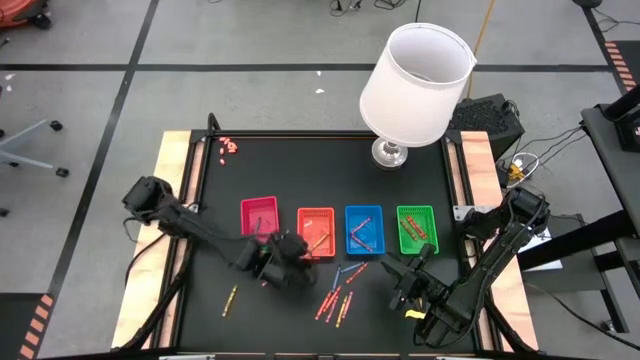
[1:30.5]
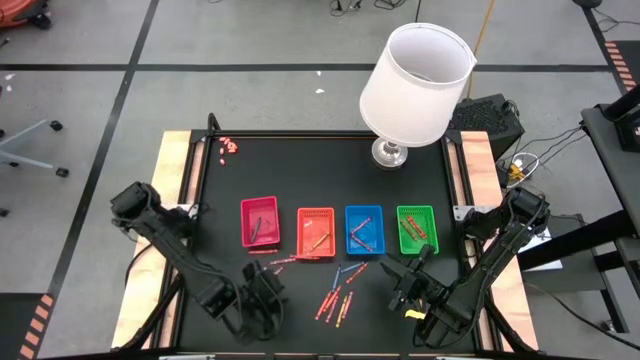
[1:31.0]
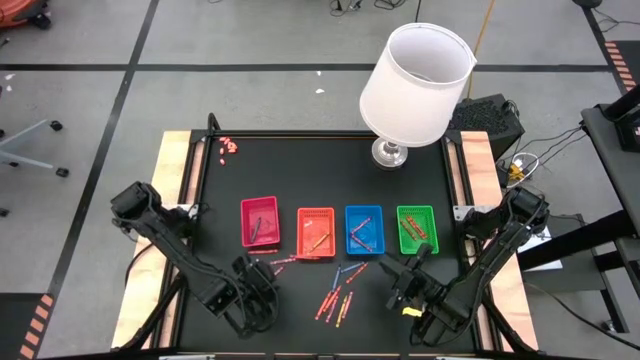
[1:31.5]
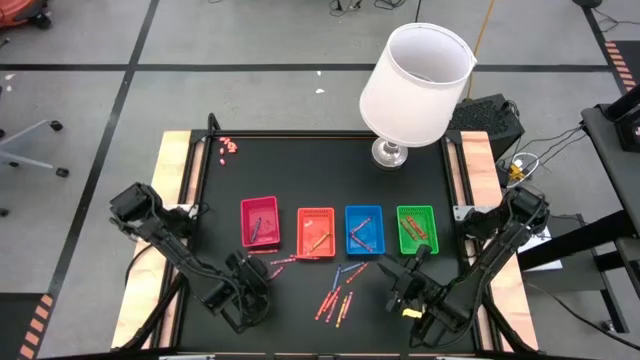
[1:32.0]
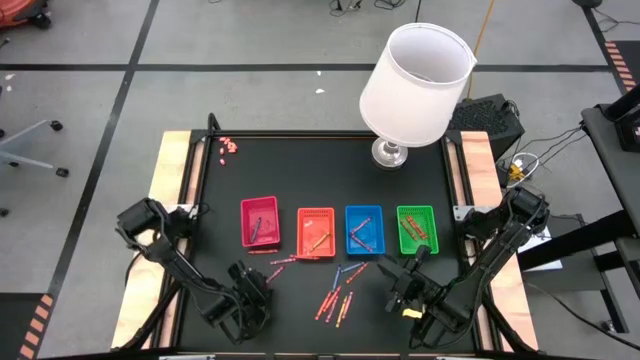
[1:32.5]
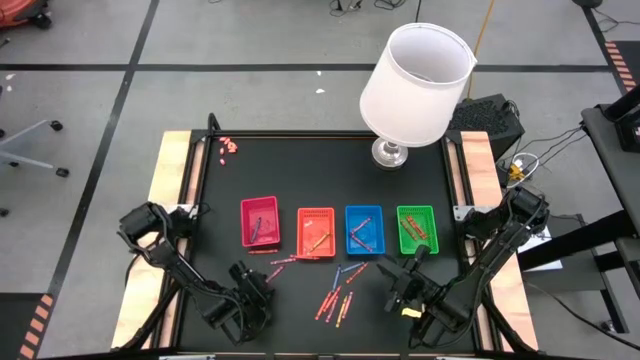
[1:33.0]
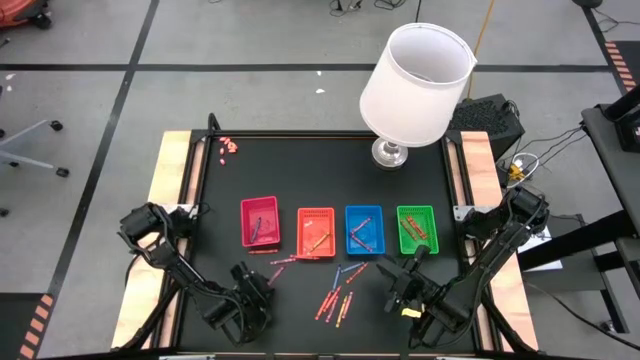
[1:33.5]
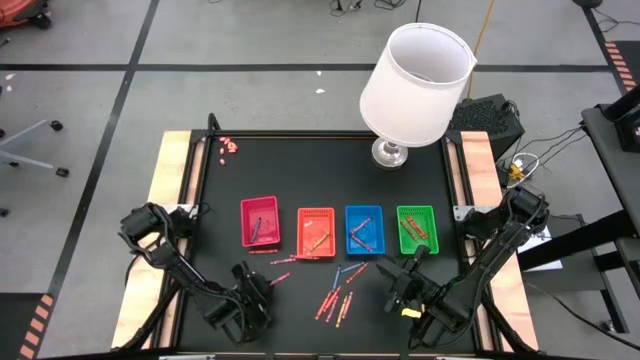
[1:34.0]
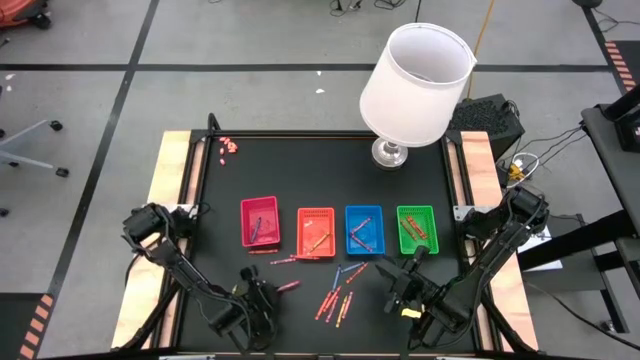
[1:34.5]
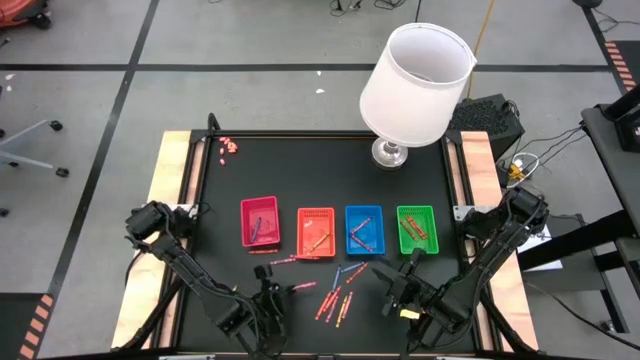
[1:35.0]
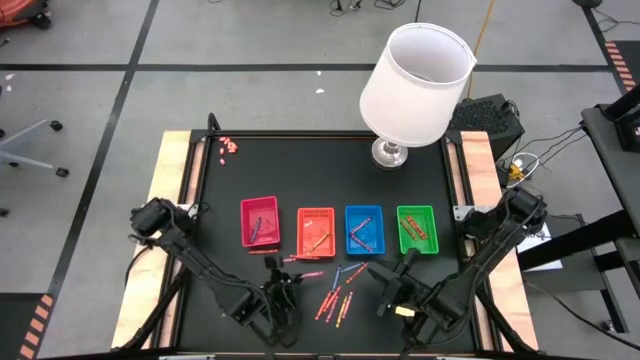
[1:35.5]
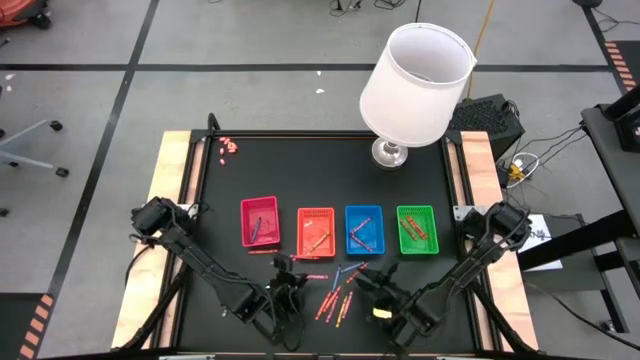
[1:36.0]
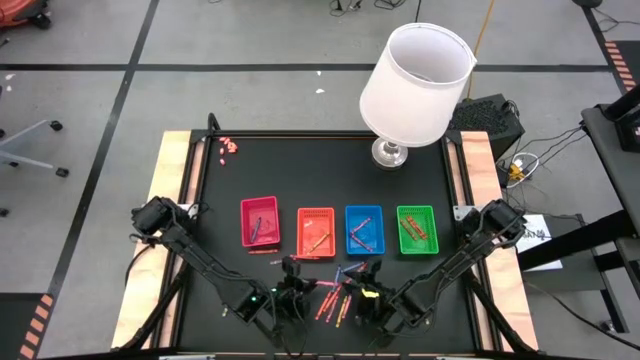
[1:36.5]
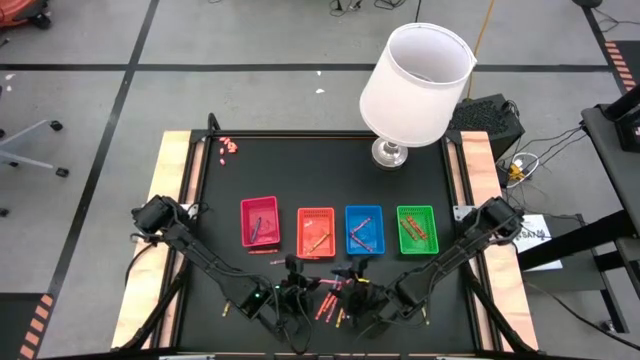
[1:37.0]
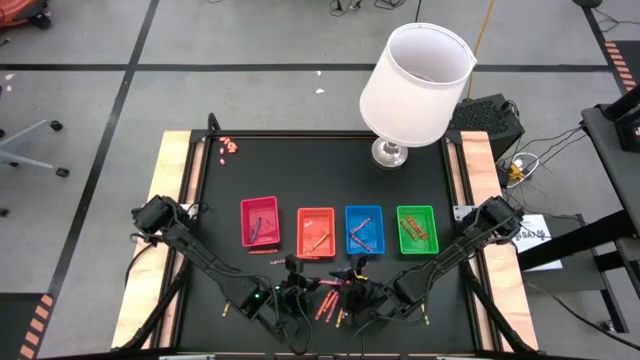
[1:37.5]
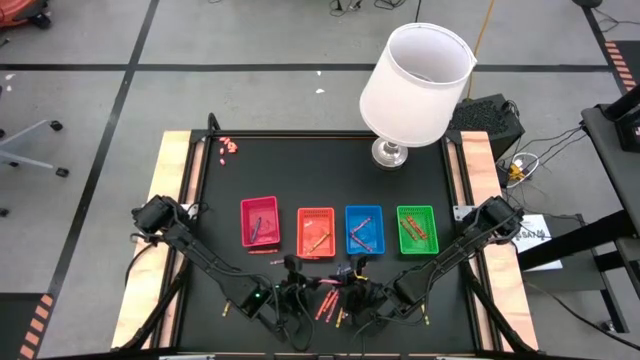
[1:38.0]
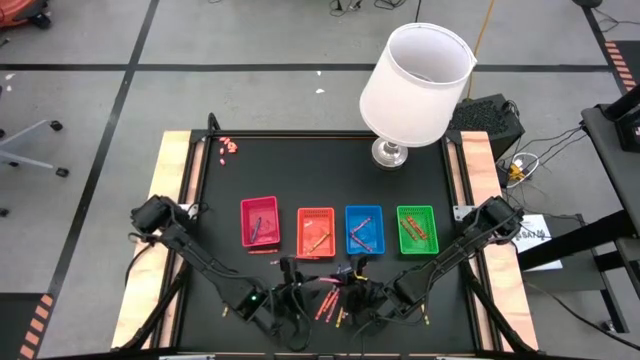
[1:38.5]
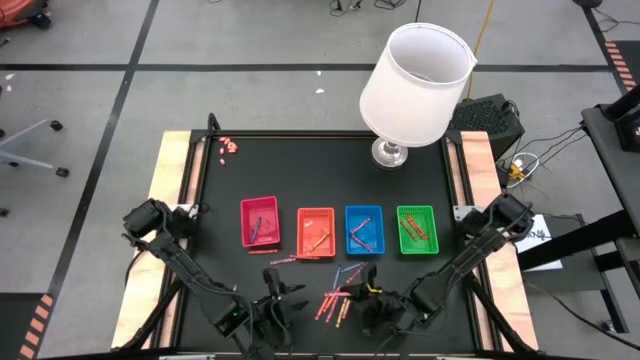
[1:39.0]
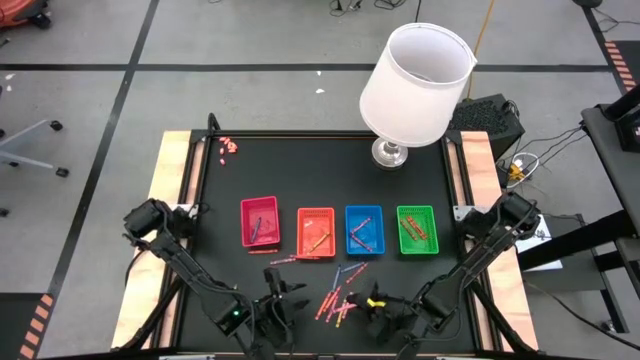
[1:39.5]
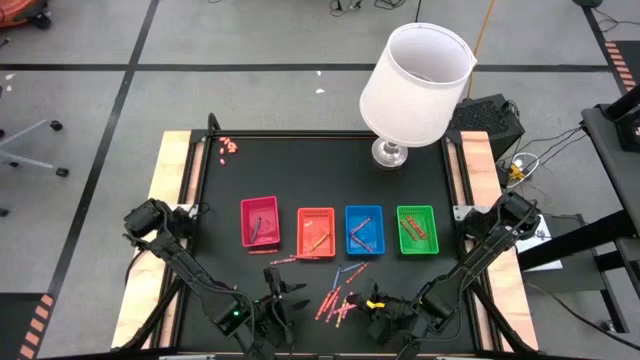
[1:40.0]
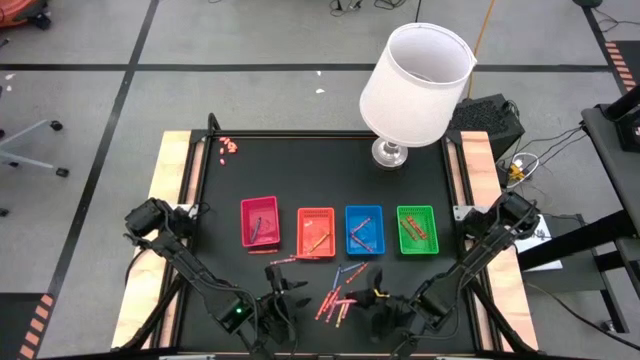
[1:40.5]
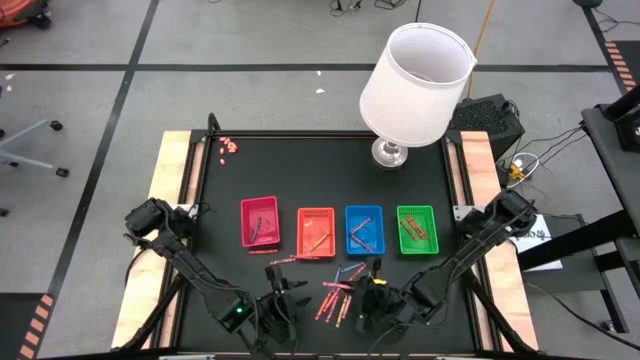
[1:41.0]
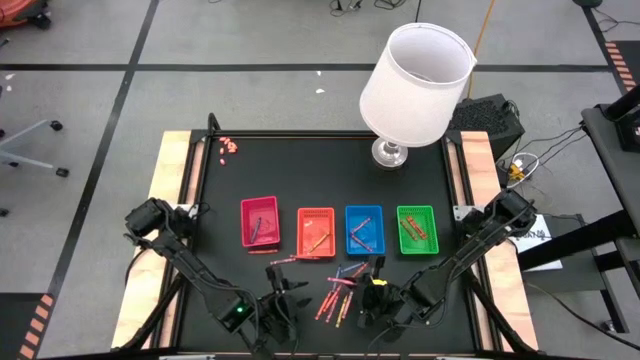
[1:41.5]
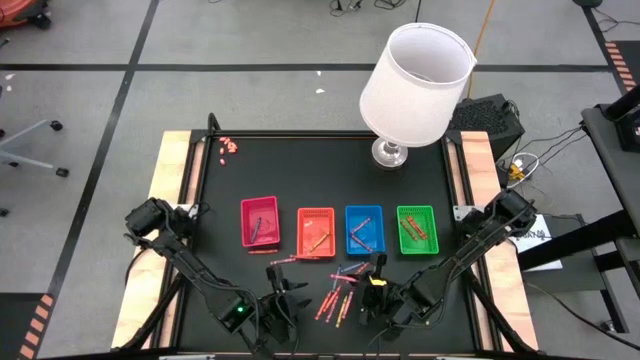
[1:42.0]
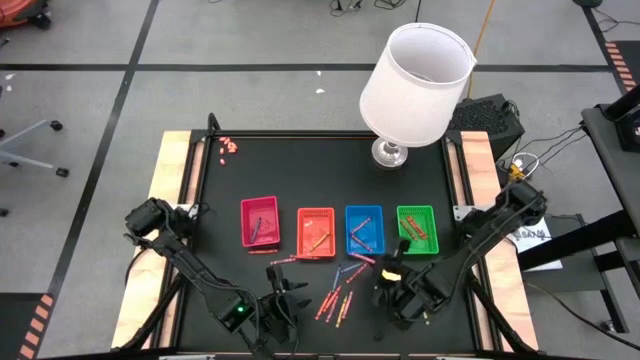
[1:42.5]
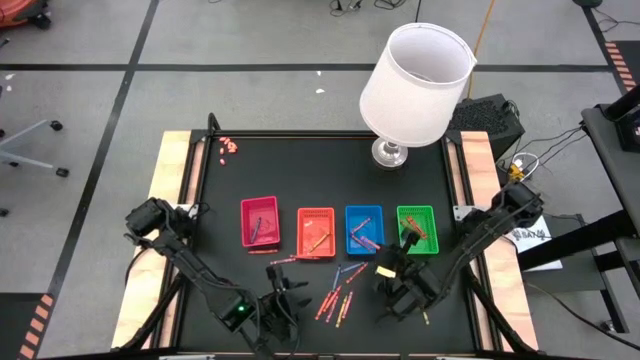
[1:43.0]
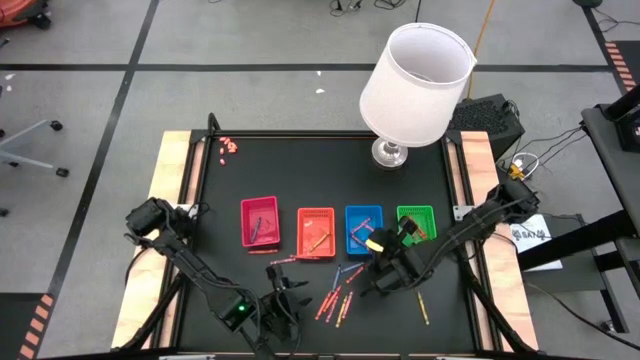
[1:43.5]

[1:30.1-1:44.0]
Task: Sort crayons
Put the red crayon into the blue bin

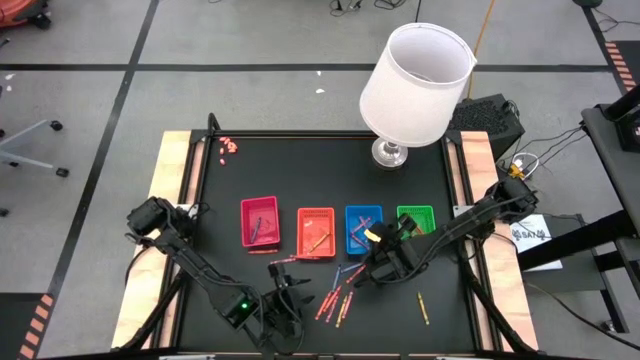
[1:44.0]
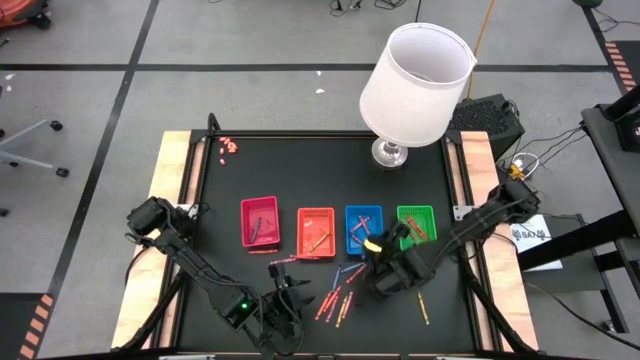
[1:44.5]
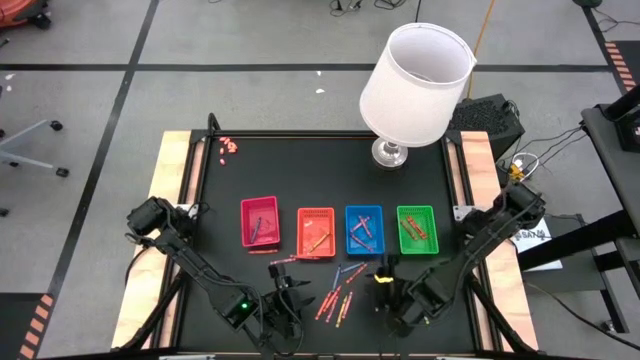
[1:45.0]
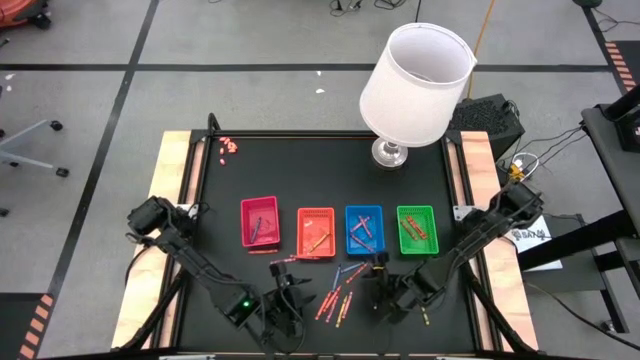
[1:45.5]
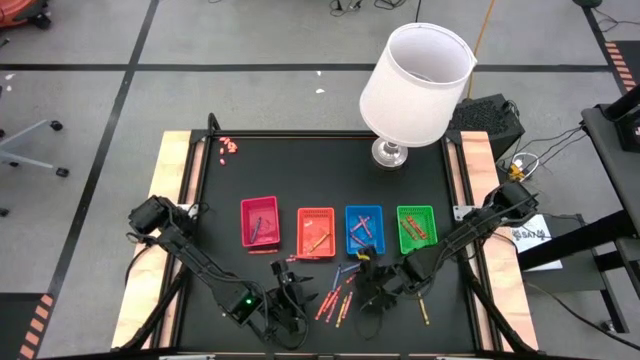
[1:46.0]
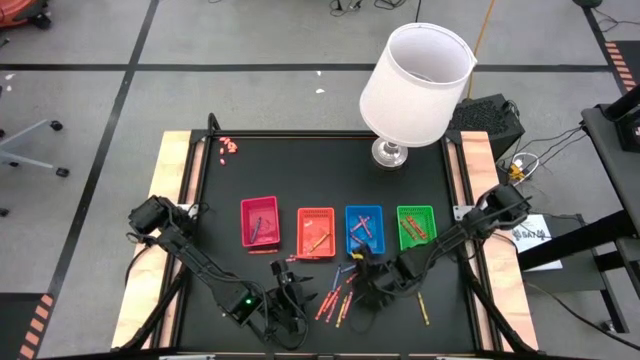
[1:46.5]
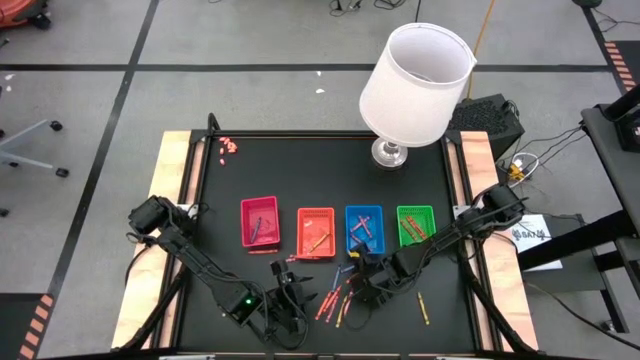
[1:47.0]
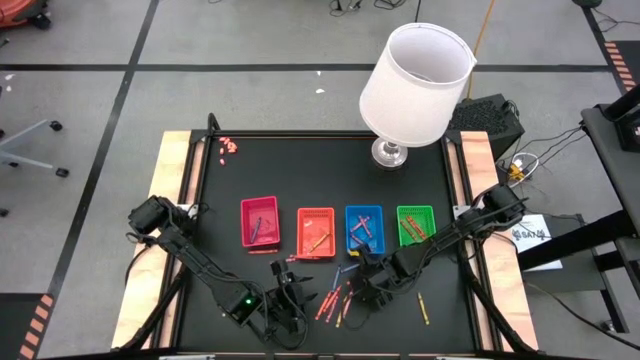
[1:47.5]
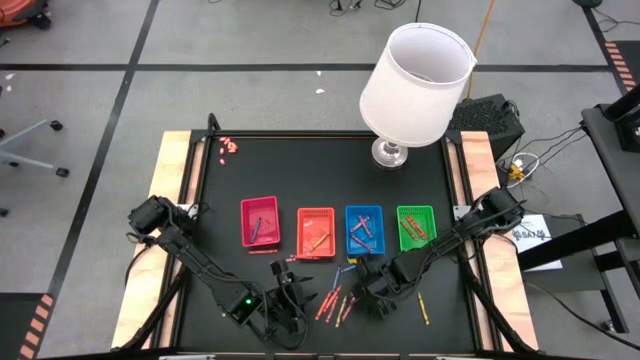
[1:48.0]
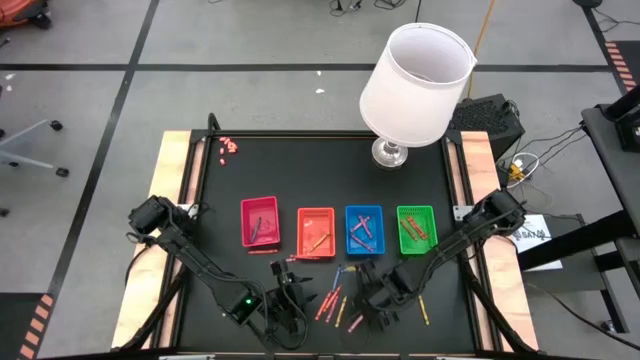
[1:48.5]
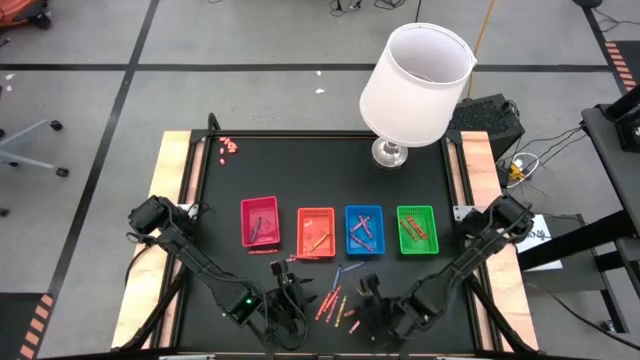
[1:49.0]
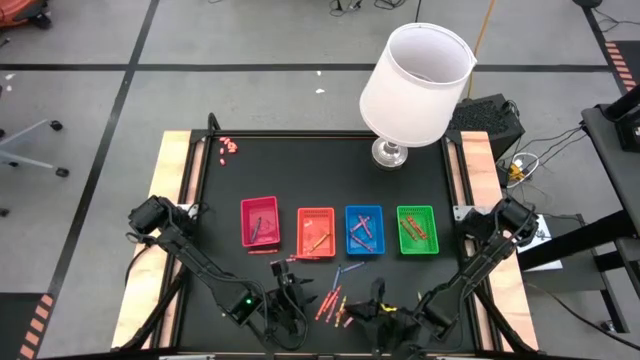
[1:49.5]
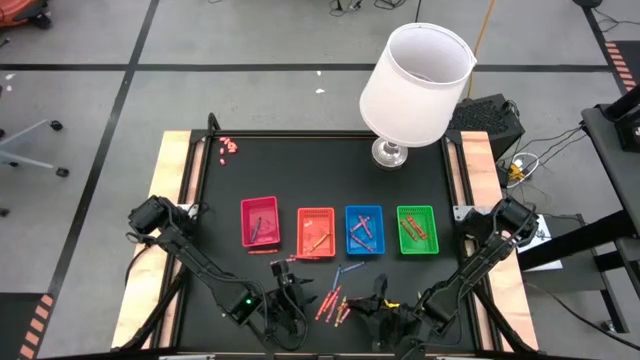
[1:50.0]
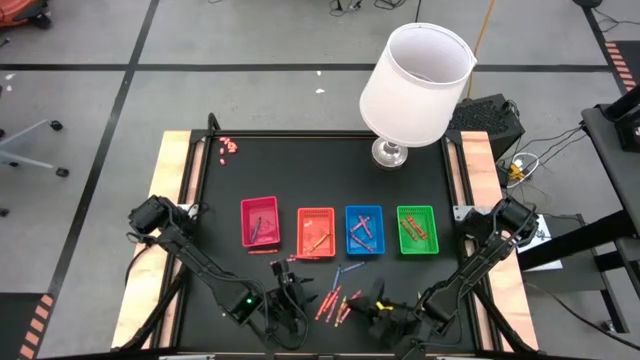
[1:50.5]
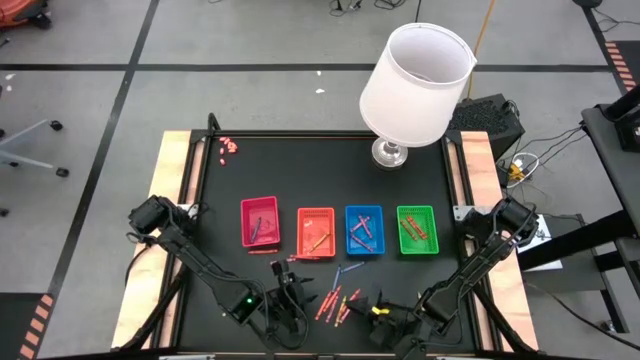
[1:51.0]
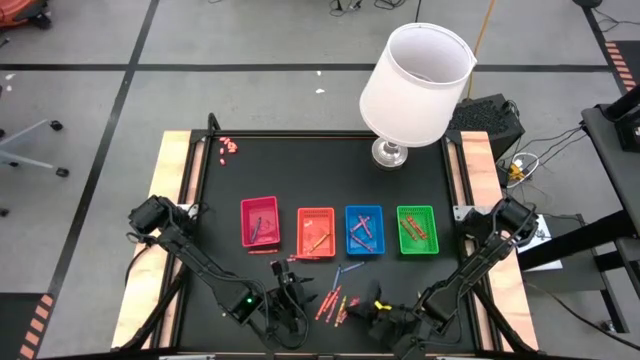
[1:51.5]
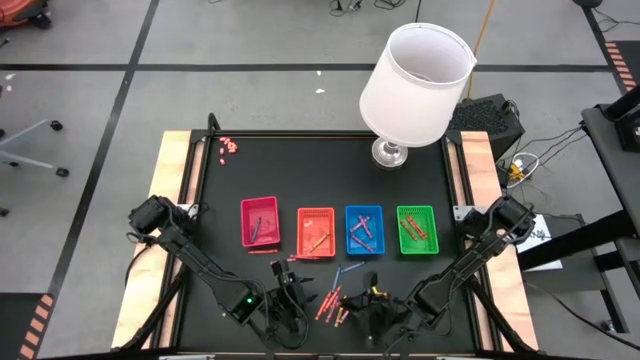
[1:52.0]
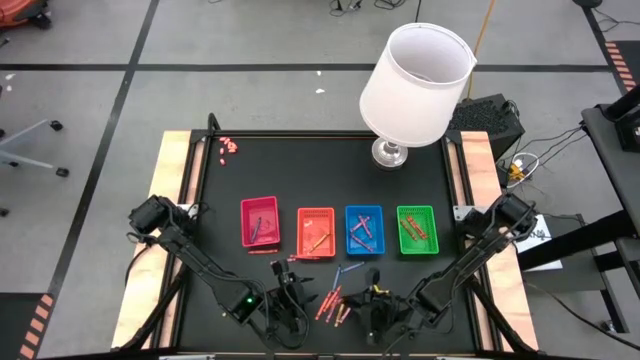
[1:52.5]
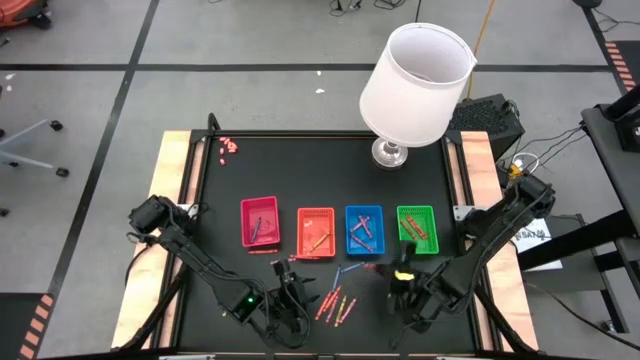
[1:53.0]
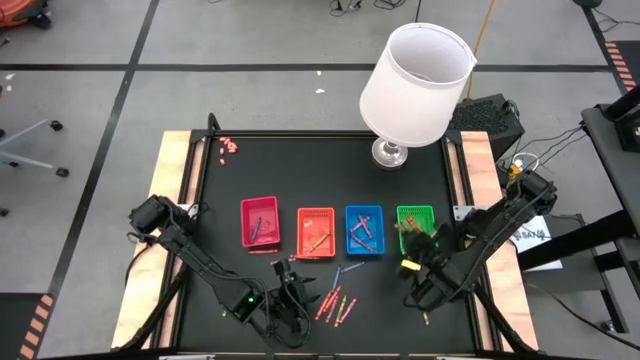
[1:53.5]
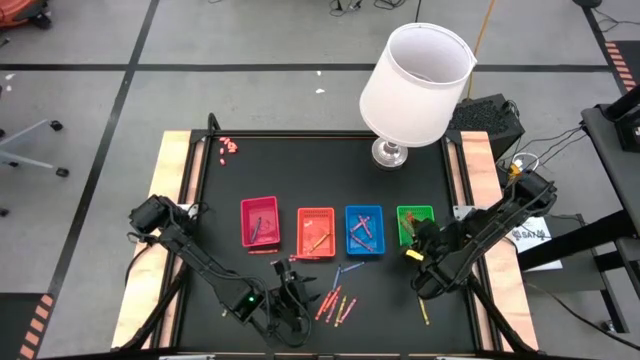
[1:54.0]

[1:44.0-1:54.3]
Put the orange crayon into the green bin
